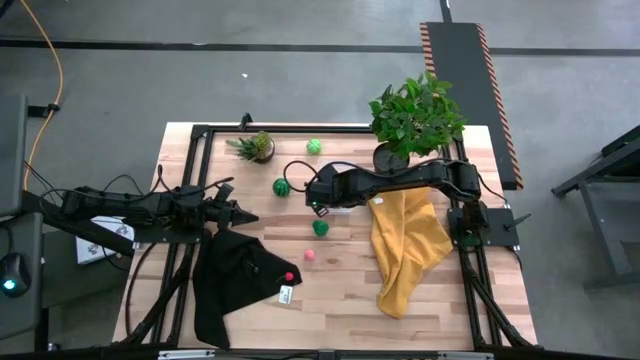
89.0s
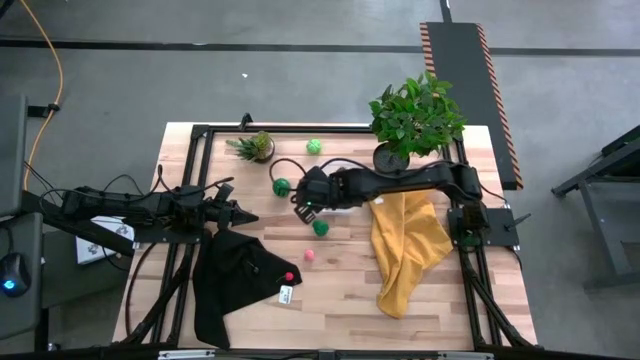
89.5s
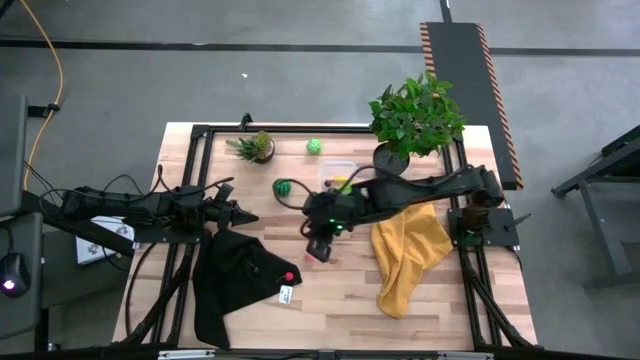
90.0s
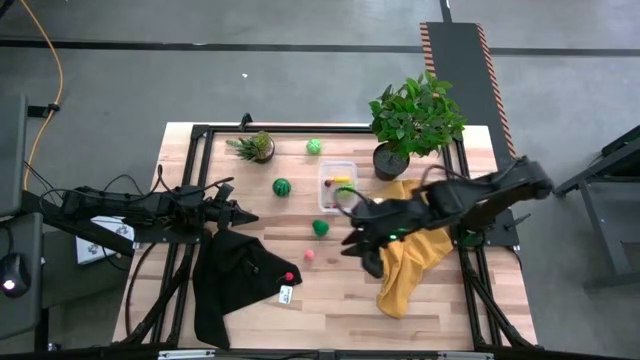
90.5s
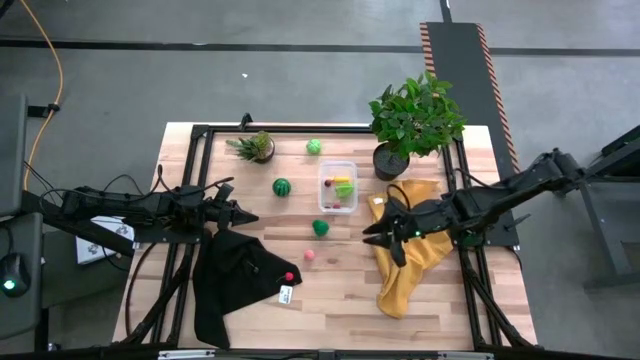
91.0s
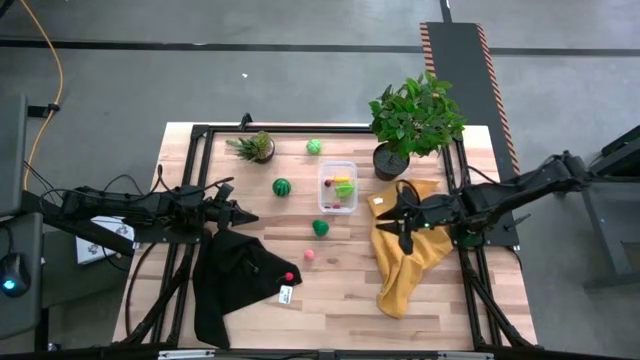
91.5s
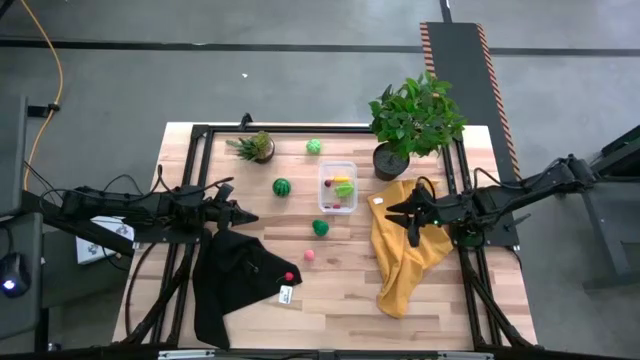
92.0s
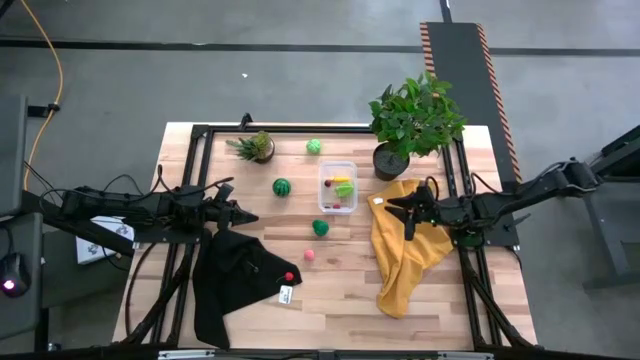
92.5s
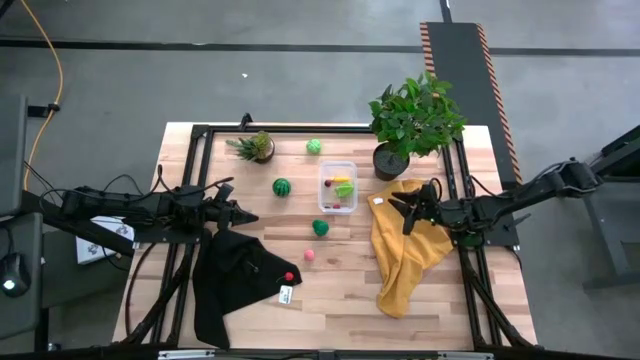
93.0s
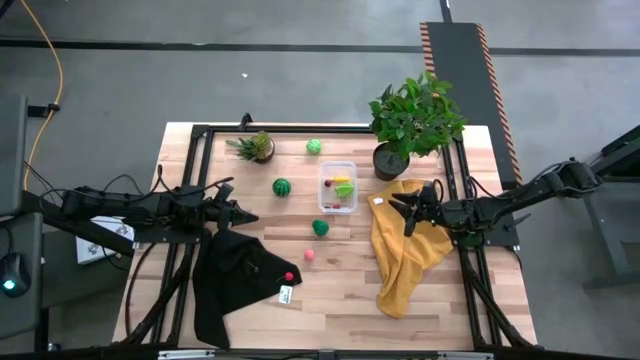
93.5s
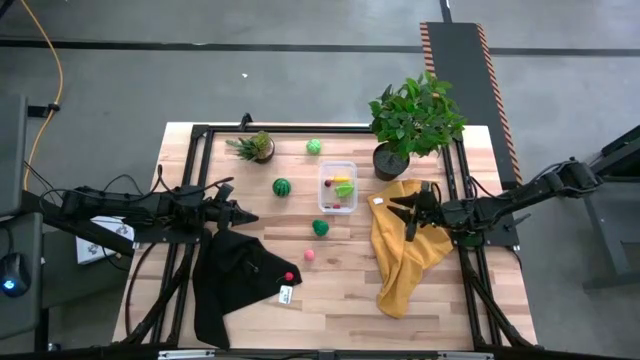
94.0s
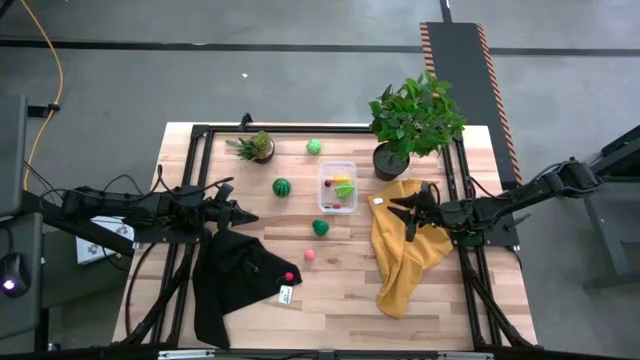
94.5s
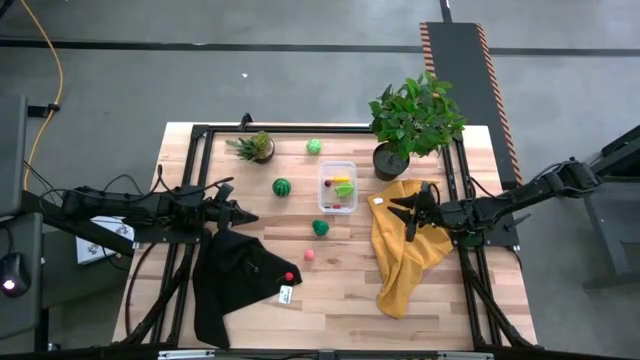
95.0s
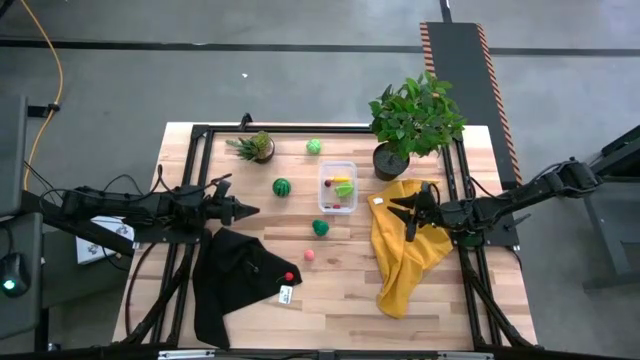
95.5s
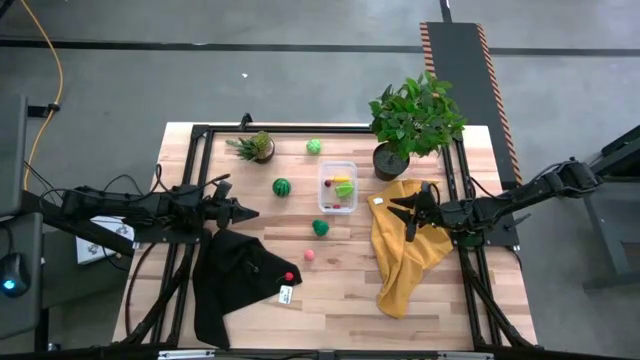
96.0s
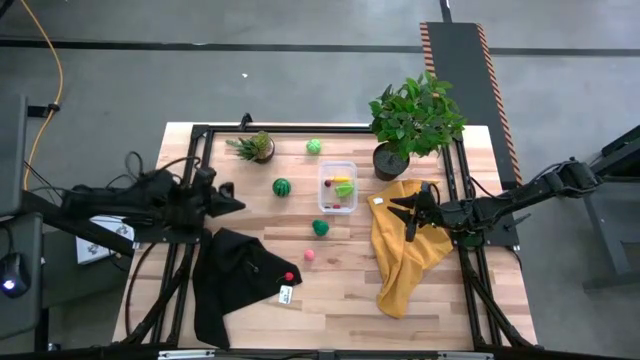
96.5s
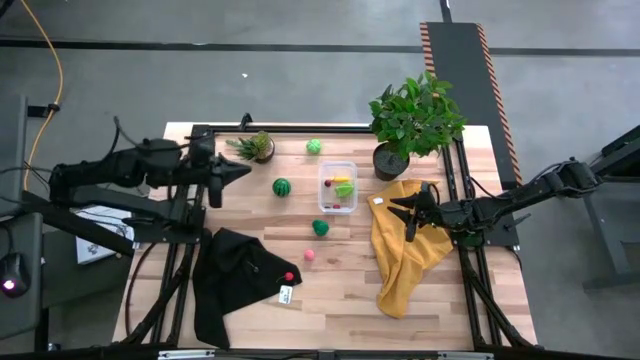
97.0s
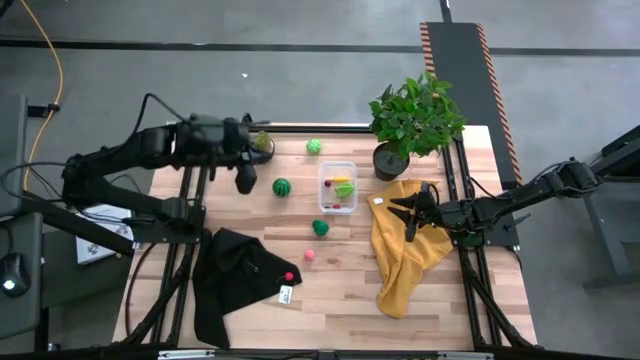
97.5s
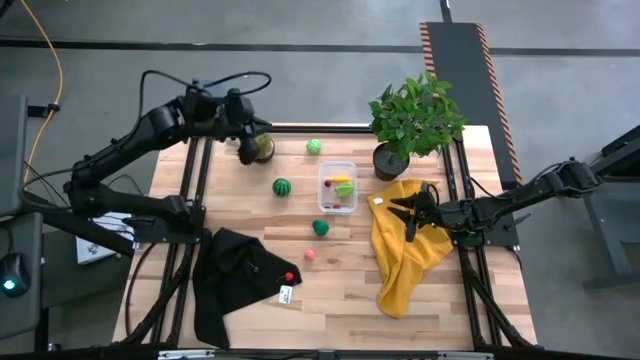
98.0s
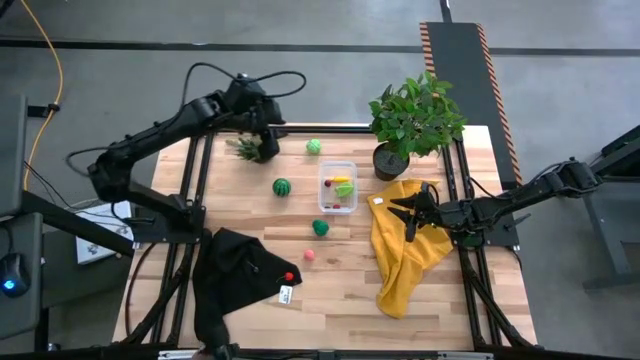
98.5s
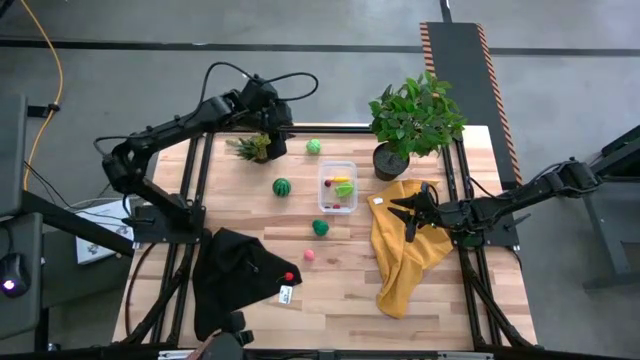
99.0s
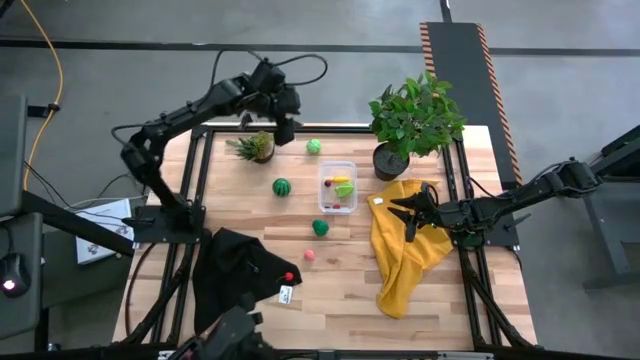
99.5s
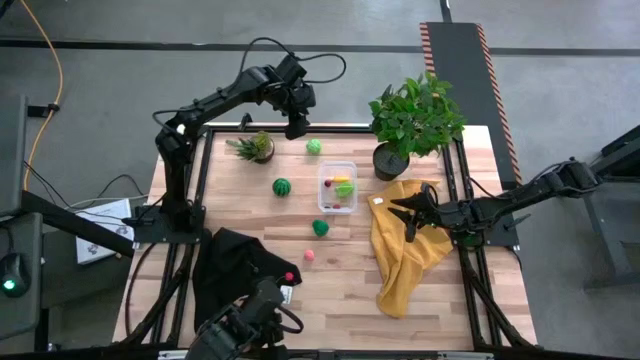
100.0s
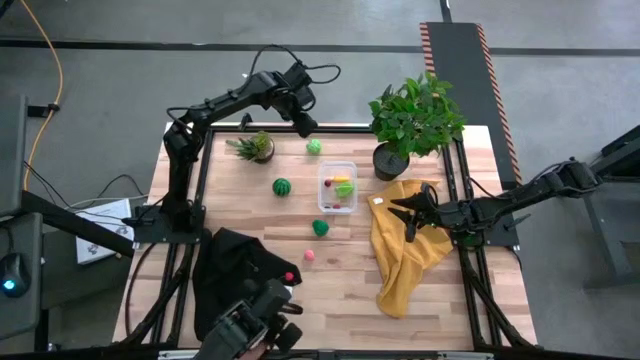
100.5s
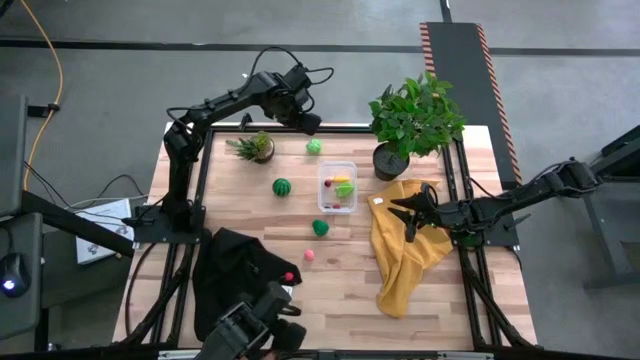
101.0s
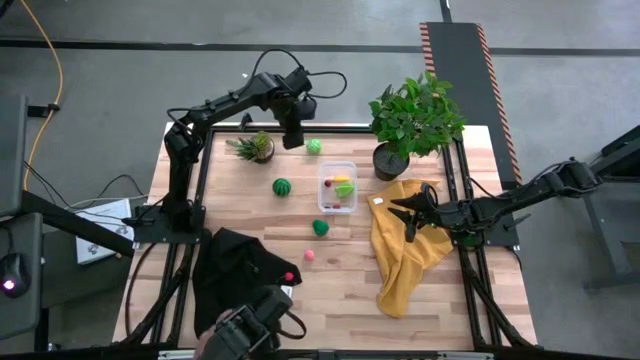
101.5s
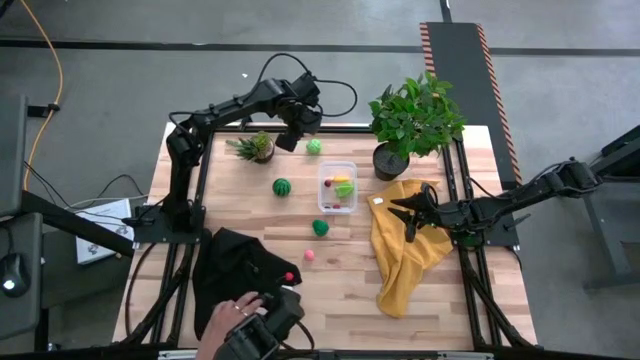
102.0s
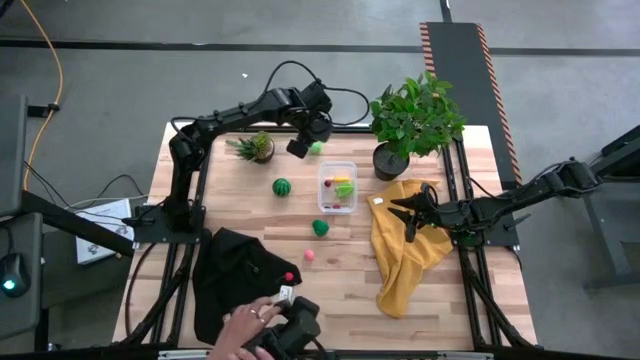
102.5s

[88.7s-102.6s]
Task: Pick and placing Produce into tupperware
Put the cabbage into the transparent bin

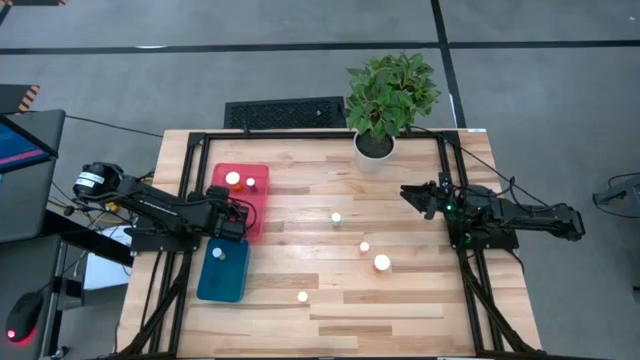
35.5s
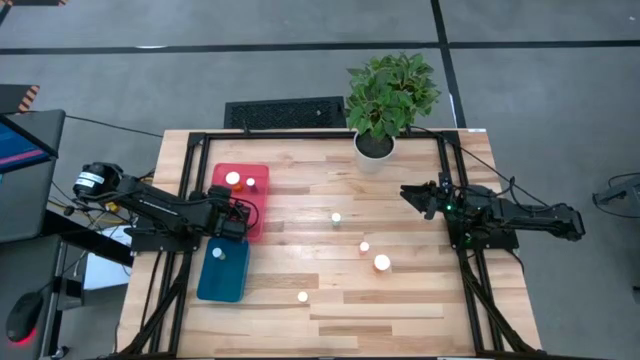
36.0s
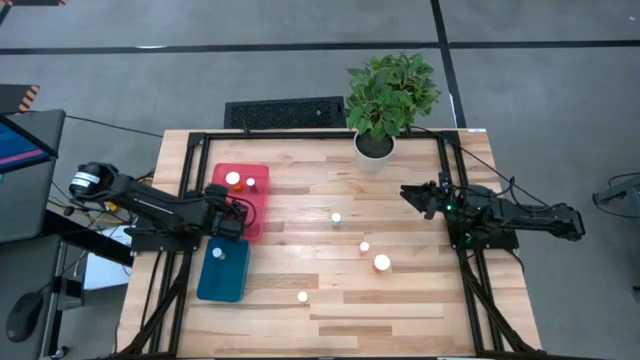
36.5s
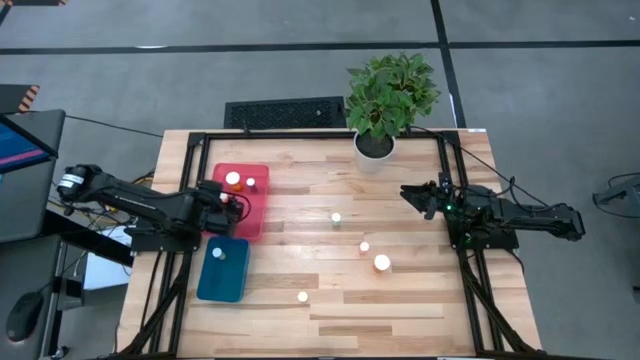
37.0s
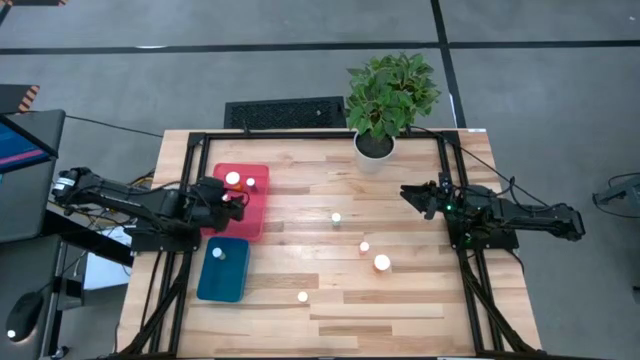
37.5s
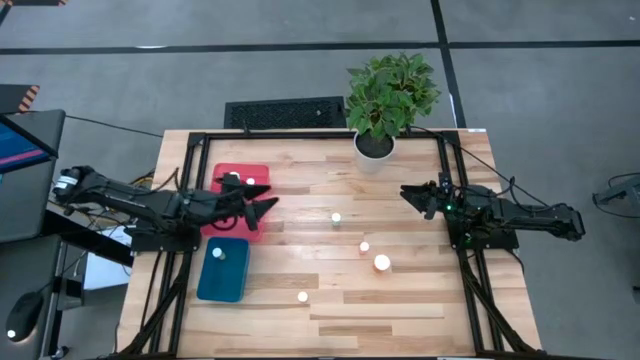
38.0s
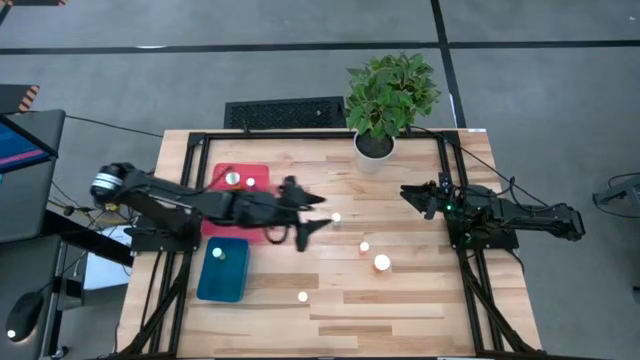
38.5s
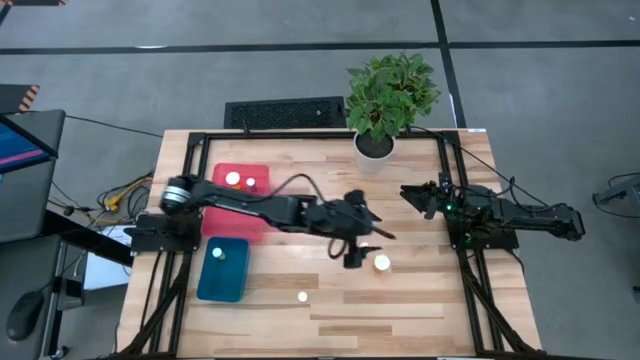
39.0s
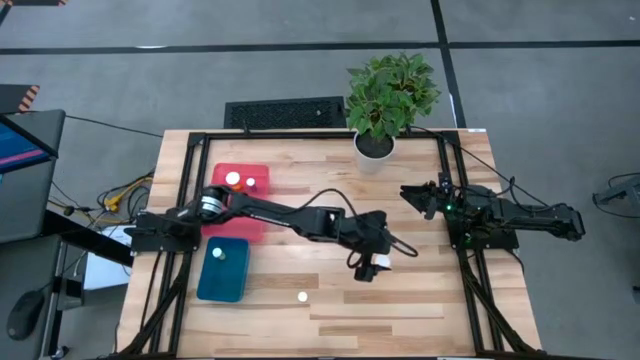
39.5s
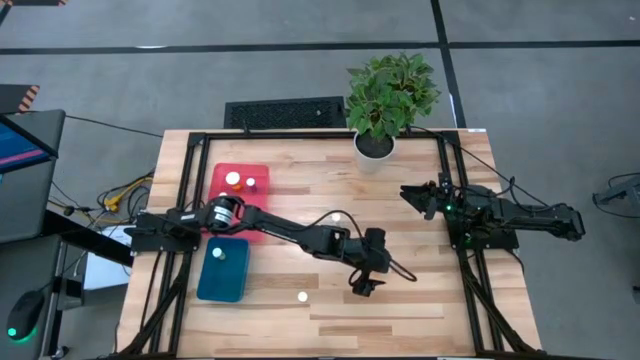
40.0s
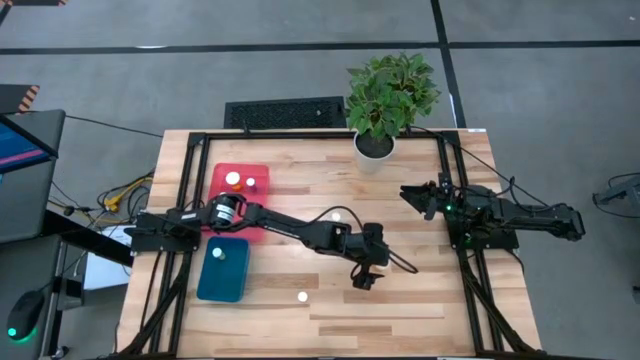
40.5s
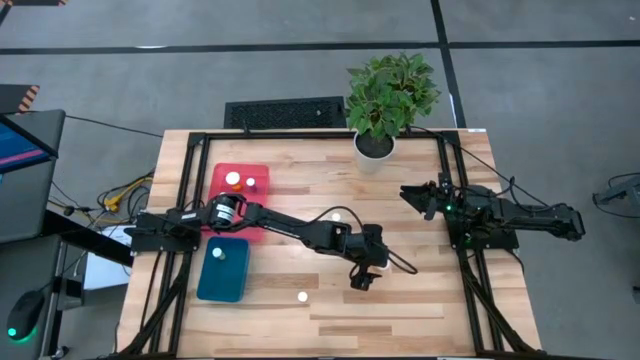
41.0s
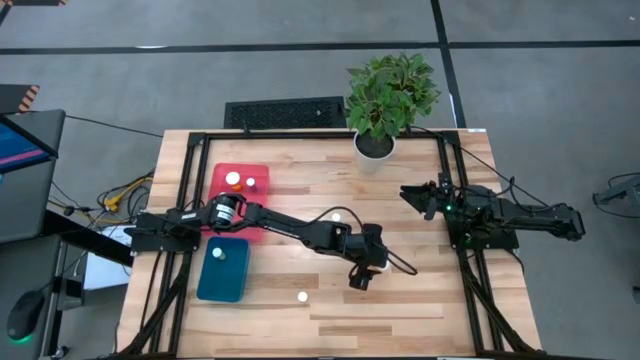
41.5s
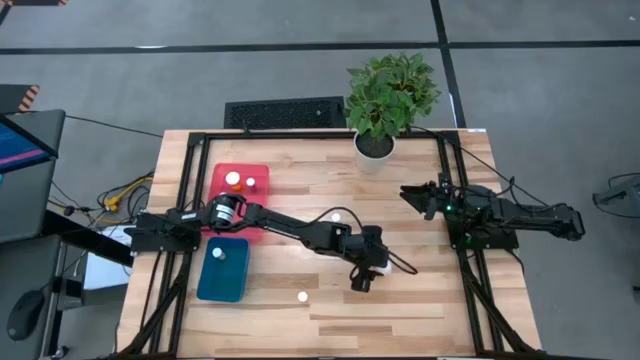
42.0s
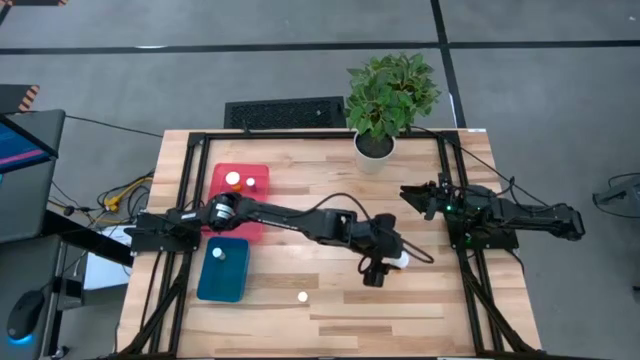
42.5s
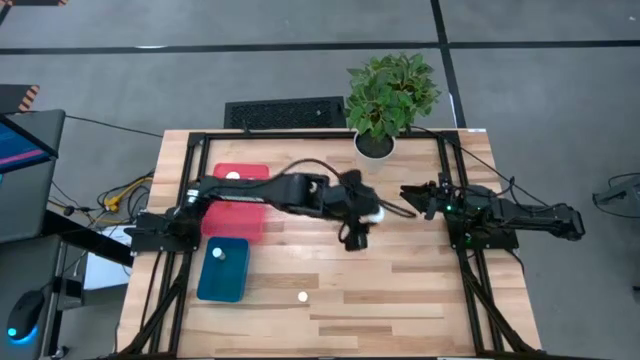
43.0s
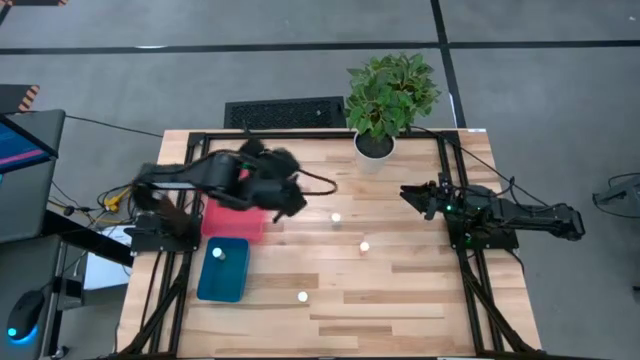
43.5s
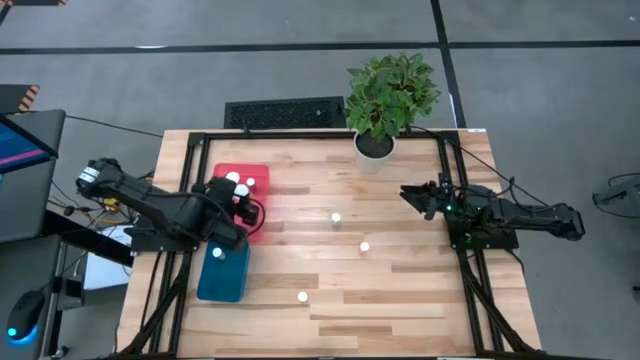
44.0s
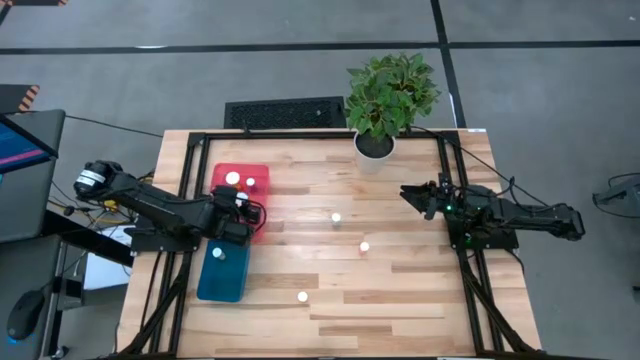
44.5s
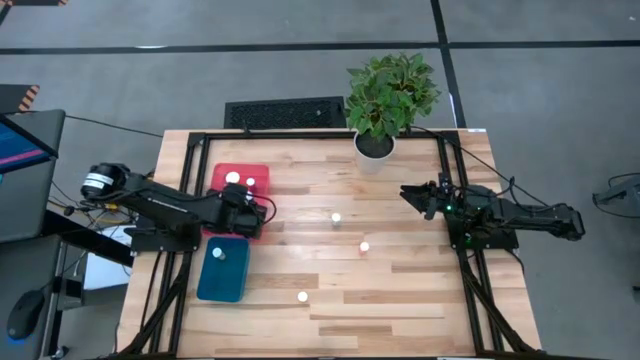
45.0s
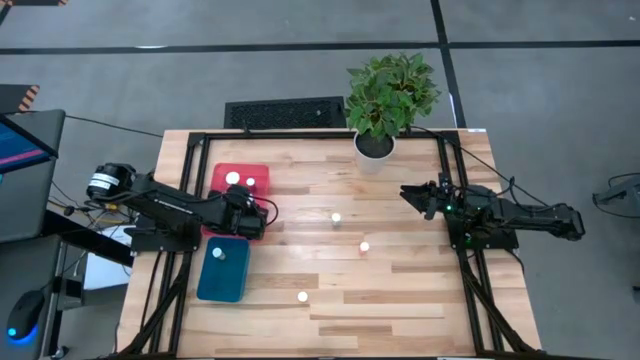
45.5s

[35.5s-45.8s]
Task: Pick and place medicine bottles into bin by pill shape (circle, oval)
Put the orange capsule bottle into the red bin
